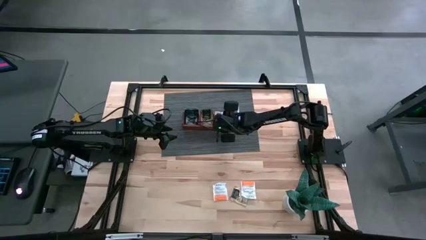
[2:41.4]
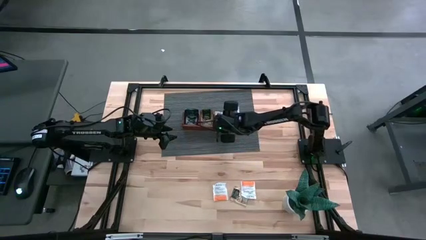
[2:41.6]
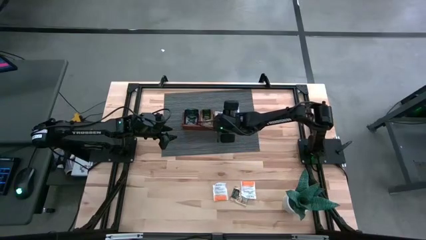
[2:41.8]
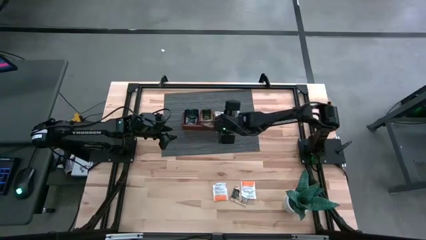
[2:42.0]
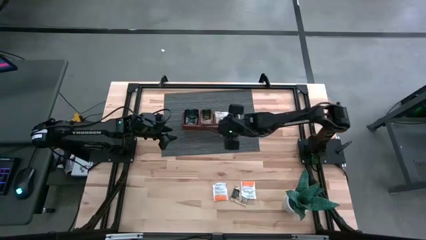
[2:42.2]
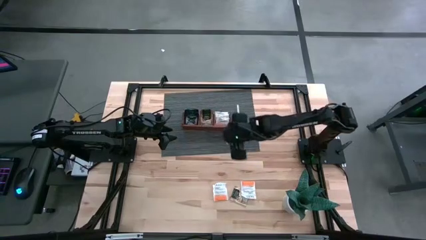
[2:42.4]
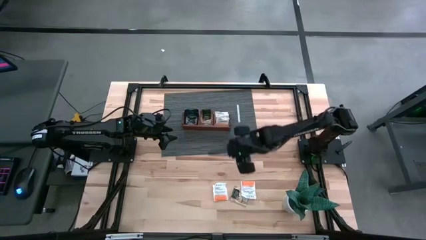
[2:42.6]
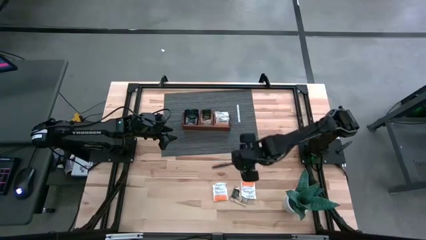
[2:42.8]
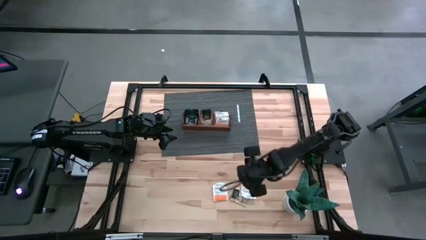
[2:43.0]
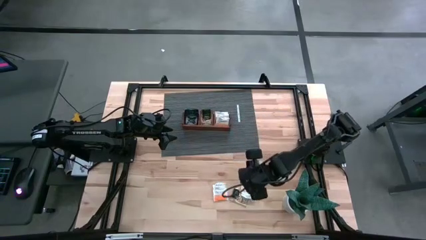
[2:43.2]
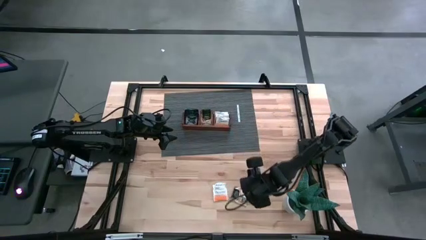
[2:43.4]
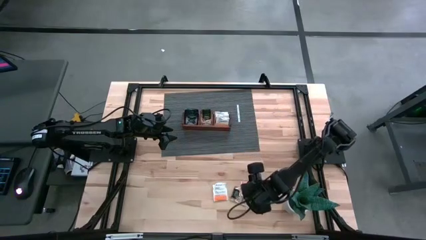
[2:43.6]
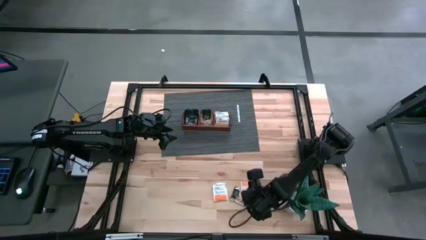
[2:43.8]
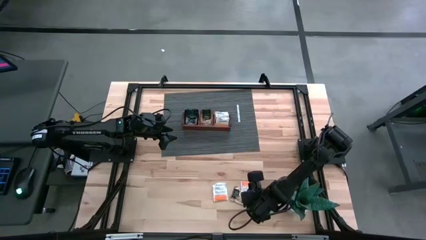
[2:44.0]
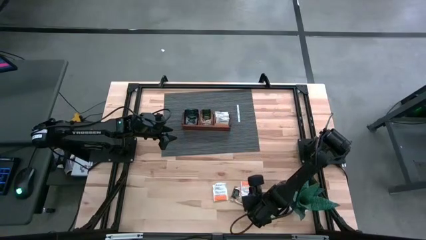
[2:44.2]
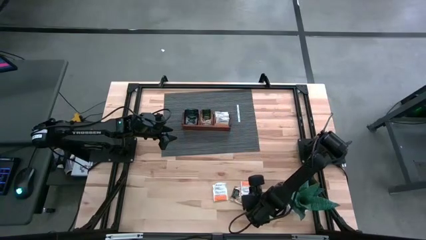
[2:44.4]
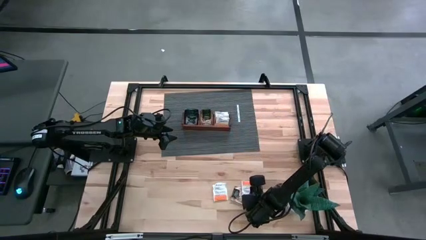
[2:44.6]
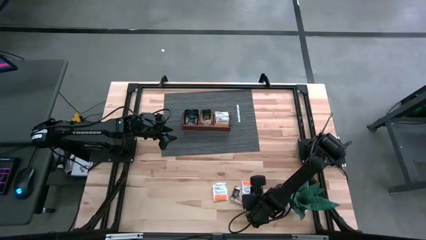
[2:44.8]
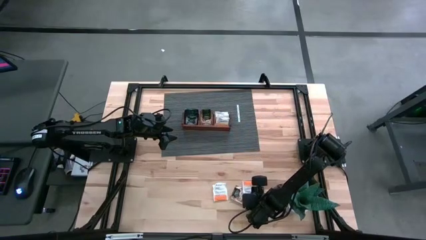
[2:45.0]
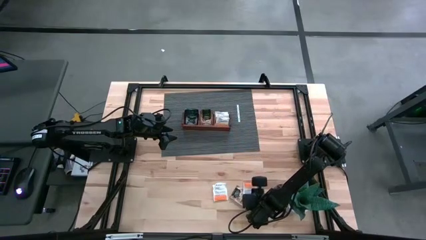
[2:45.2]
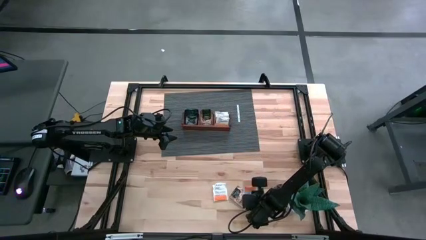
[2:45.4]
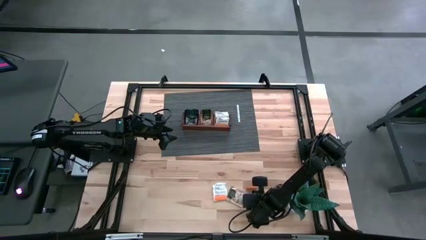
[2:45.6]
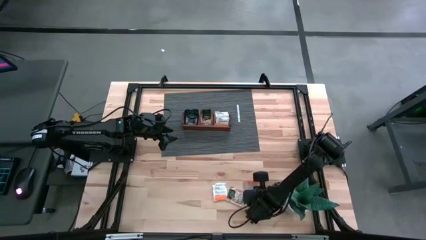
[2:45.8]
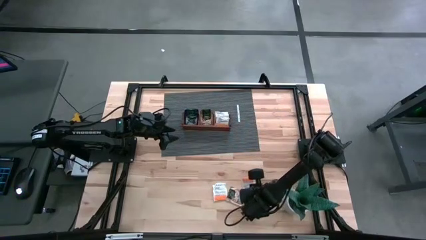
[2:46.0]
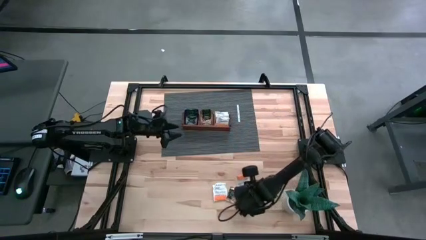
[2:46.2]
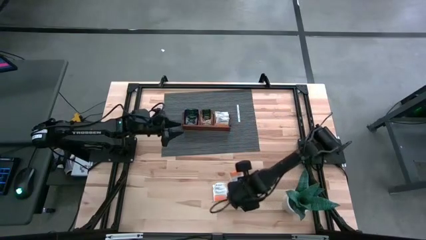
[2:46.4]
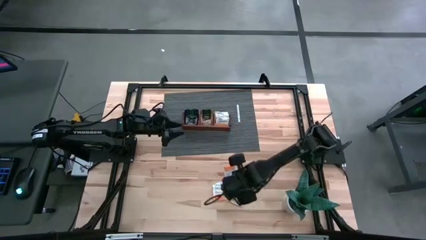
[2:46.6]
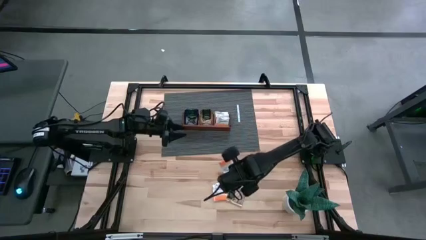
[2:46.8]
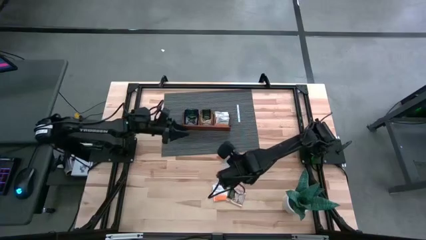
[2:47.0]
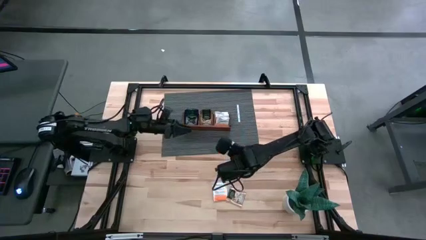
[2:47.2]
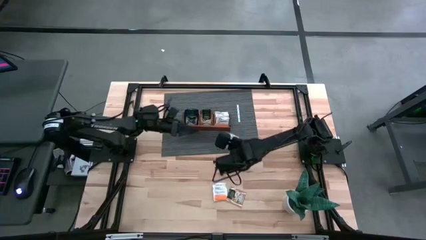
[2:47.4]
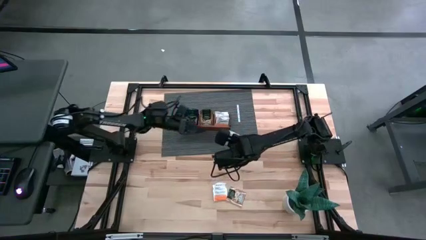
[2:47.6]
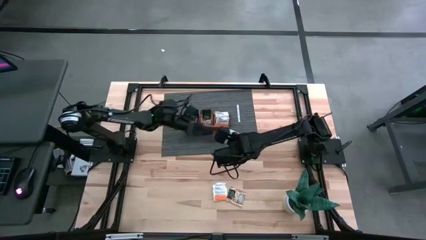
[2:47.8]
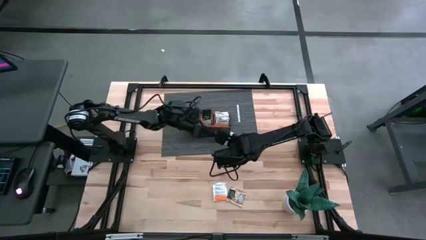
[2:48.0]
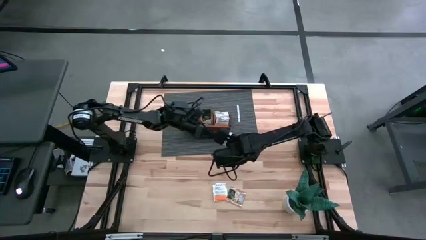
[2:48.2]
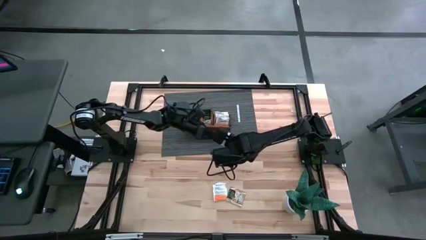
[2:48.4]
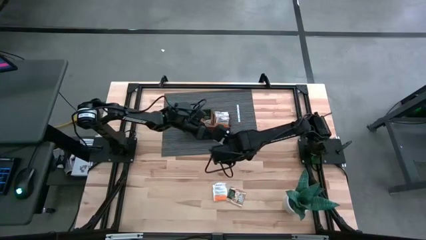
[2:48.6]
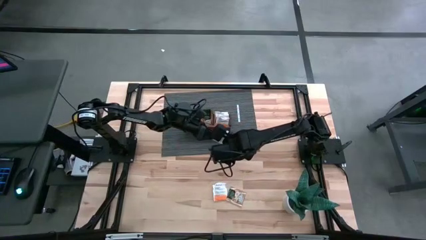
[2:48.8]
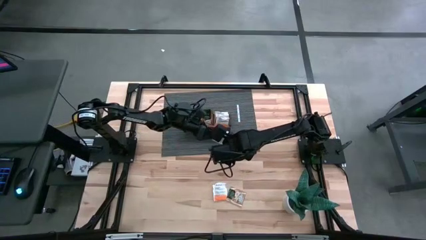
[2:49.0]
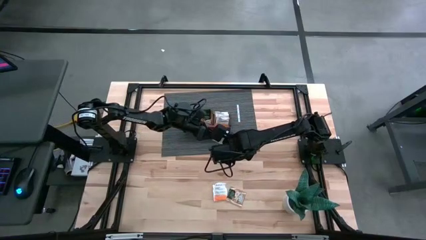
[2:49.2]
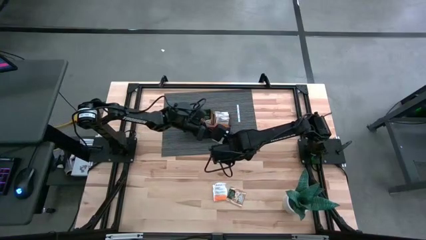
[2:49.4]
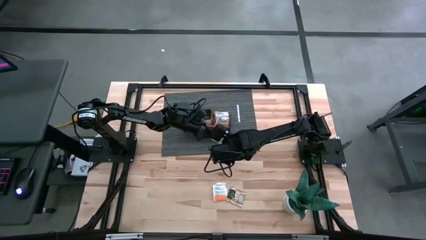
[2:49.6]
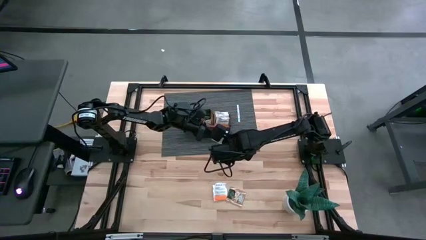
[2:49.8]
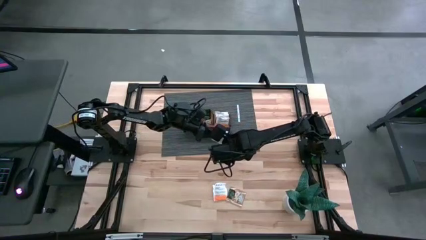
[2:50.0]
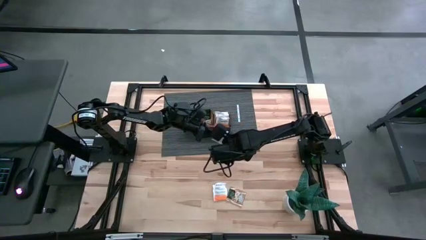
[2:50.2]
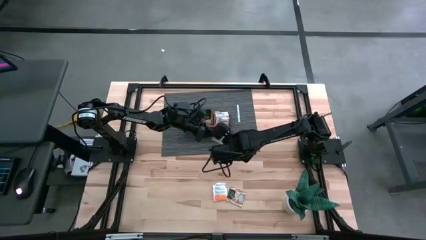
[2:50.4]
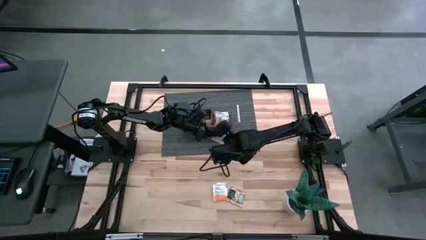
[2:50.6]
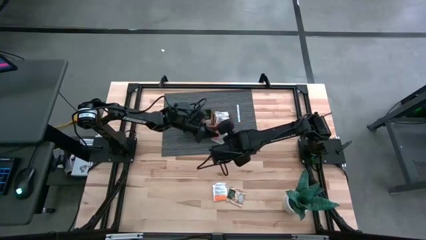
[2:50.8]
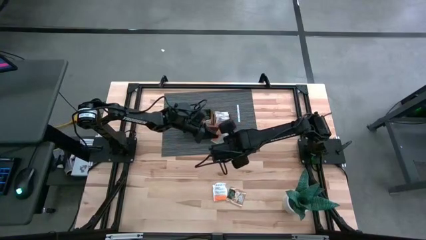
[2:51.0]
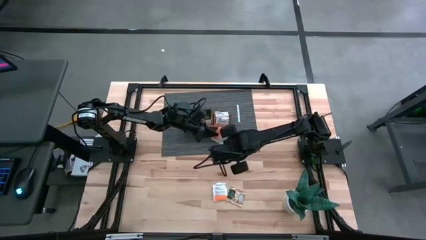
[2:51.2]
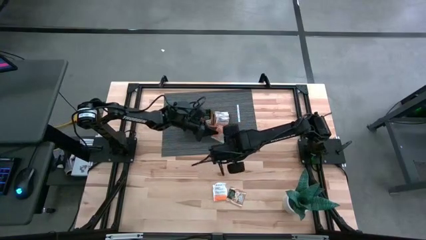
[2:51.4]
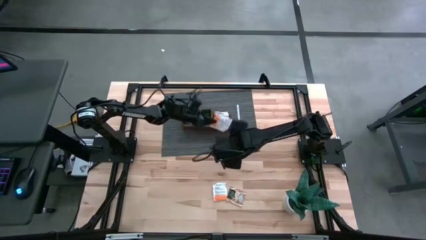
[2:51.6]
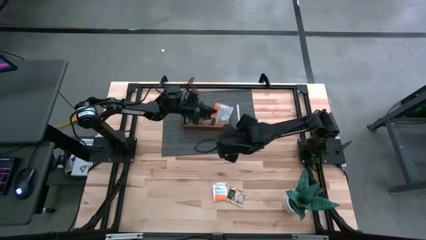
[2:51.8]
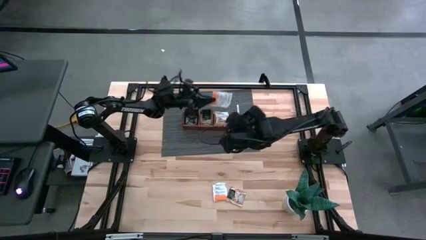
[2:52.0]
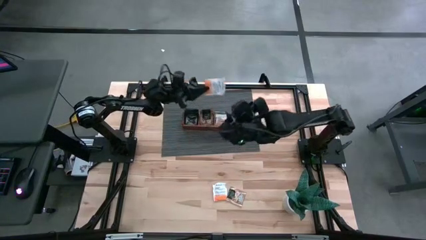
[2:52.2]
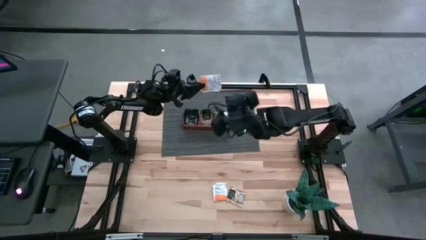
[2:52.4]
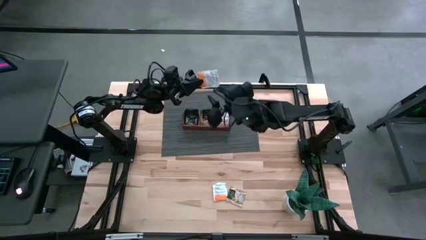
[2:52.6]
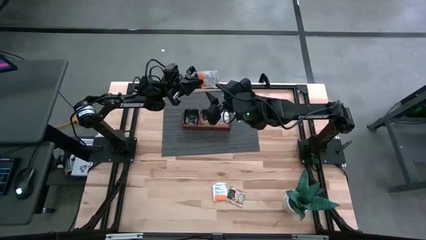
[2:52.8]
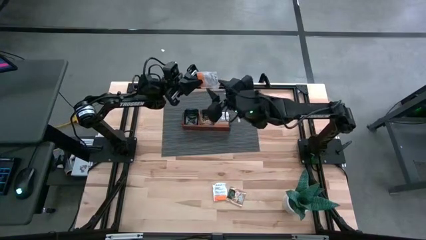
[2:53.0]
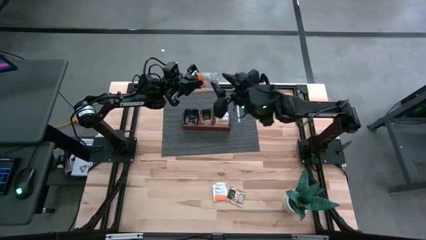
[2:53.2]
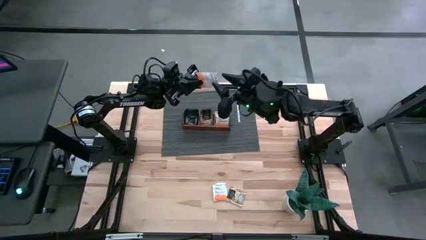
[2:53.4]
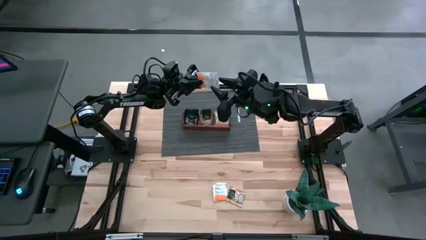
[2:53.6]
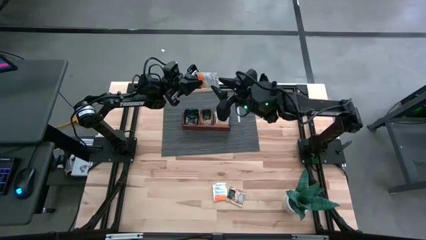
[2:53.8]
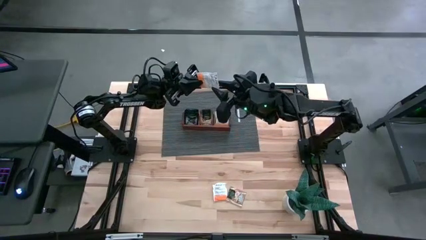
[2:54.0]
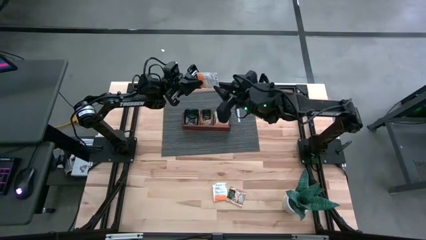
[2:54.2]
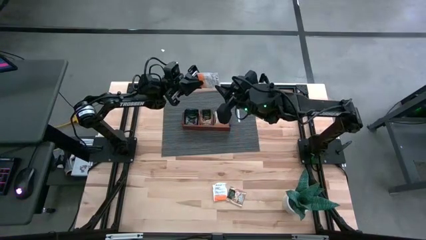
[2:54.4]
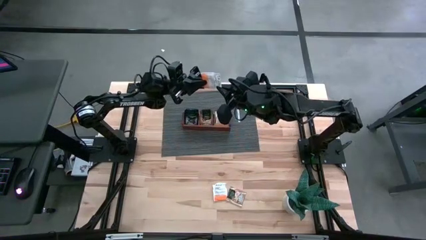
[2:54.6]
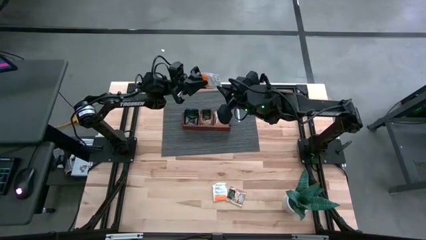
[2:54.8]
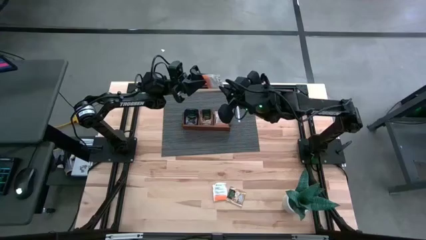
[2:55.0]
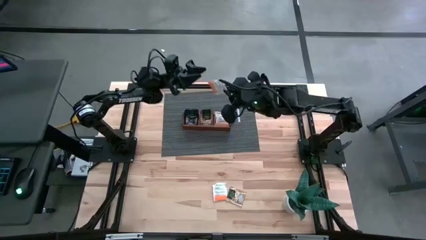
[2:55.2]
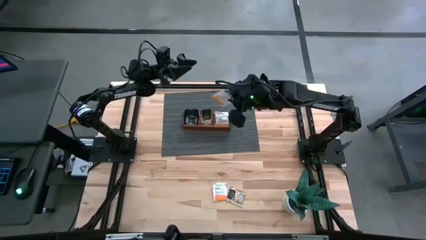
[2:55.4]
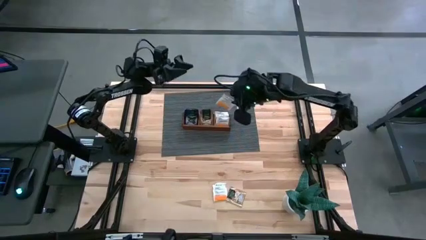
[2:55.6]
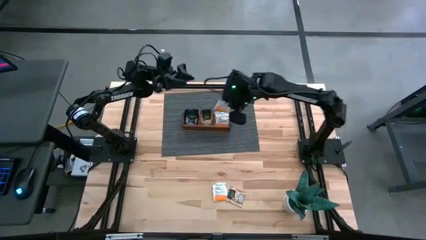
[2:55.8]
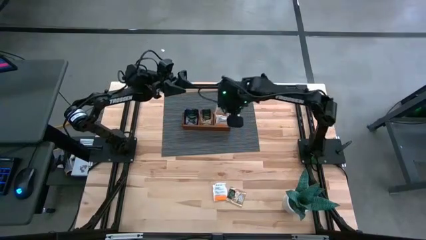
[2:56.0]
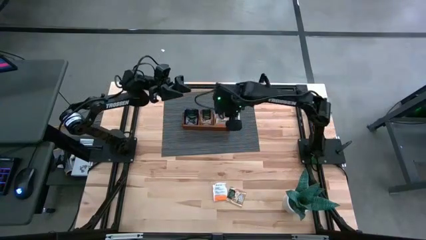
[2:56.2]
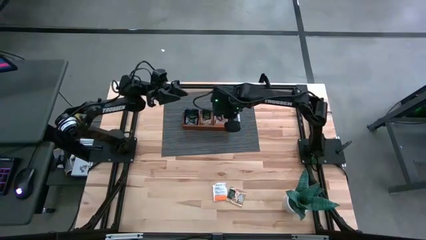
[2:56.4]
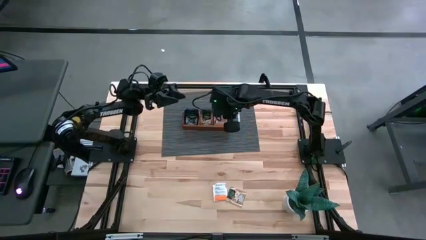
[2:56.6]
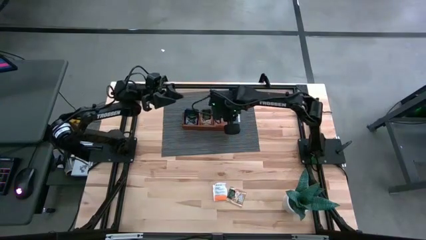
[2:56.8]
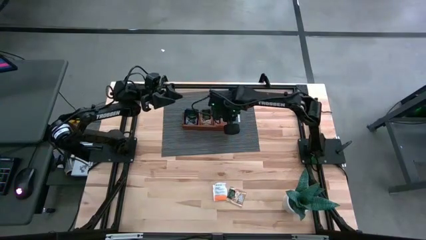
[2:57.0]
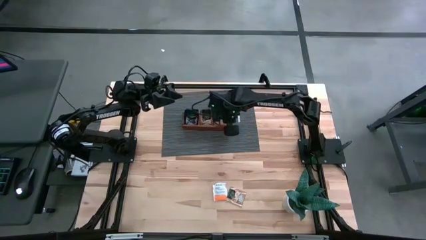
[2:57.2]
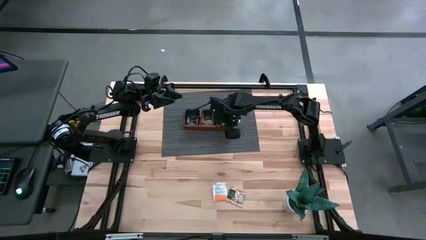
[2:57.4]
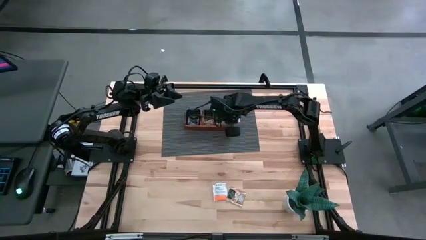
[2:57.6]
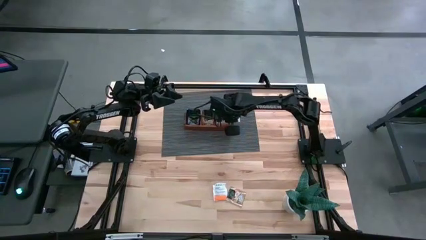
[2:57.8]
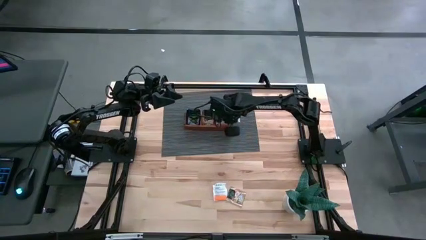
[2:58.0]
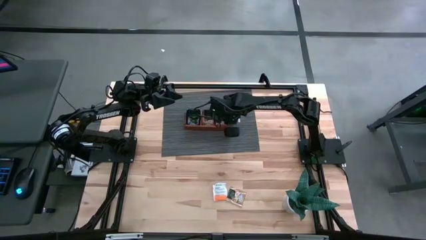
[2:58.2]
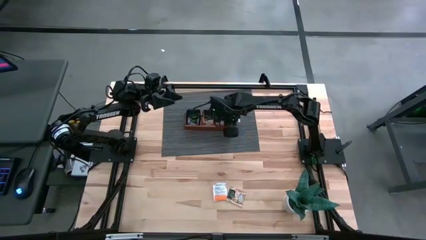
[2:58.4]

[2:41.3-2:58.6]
Task: Pick & Place Tea
Put the orange tea bag into the right section of the wooden organizer
